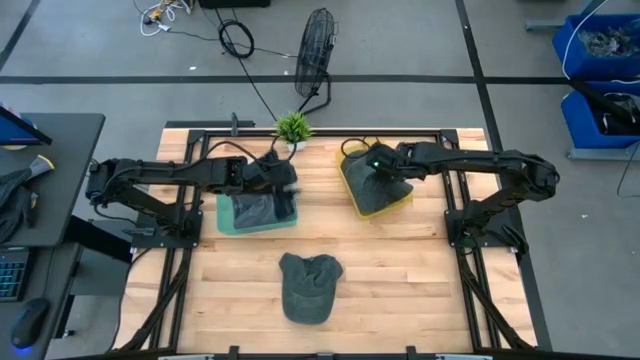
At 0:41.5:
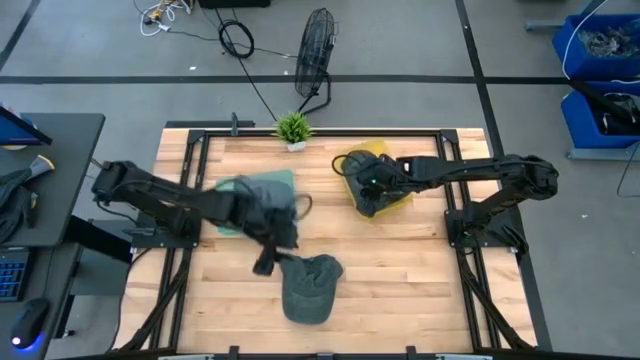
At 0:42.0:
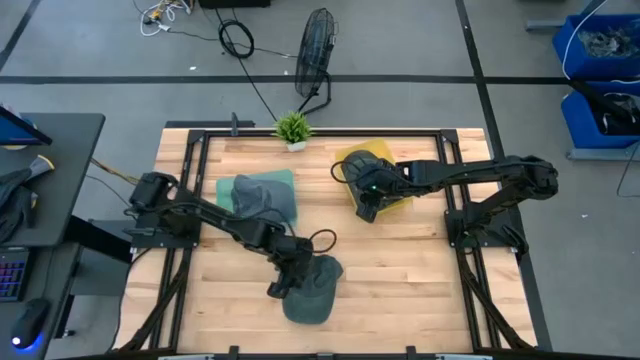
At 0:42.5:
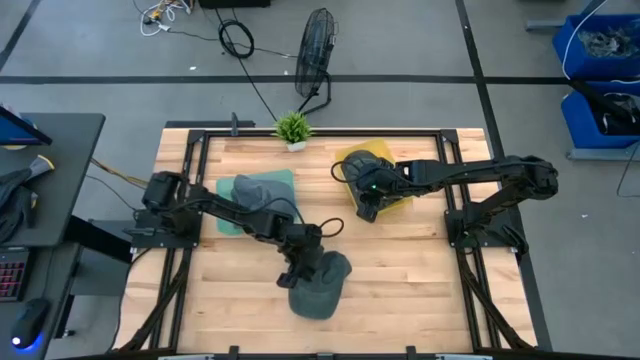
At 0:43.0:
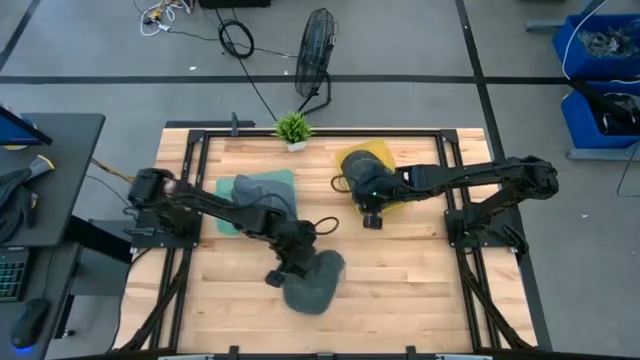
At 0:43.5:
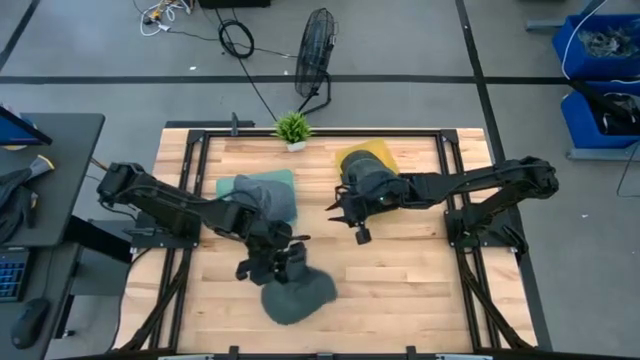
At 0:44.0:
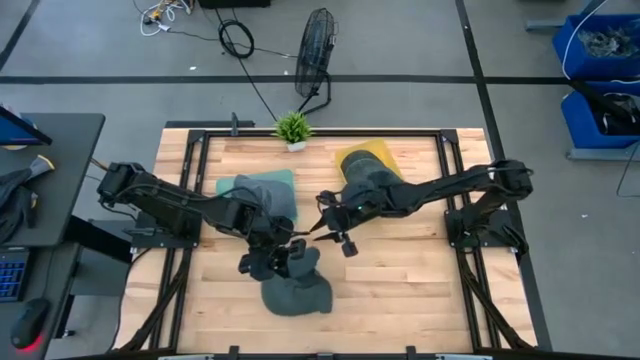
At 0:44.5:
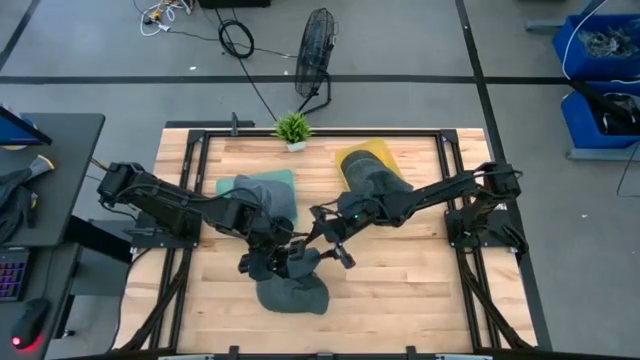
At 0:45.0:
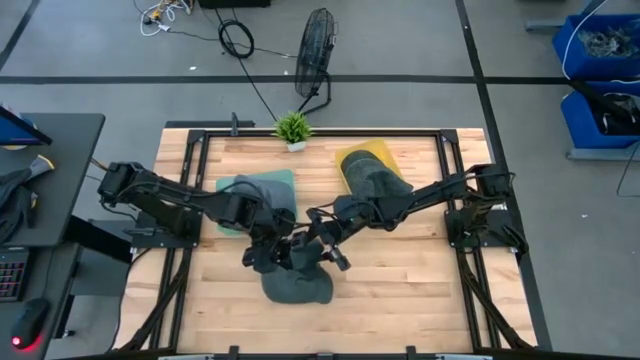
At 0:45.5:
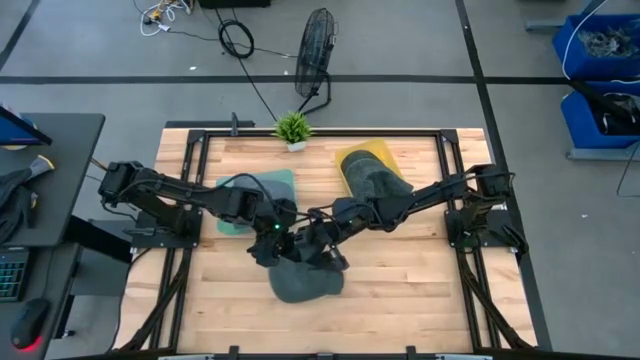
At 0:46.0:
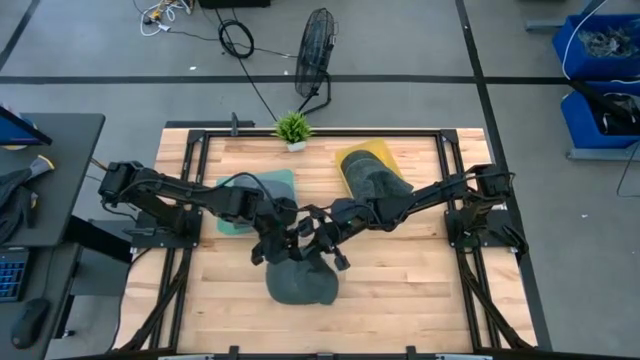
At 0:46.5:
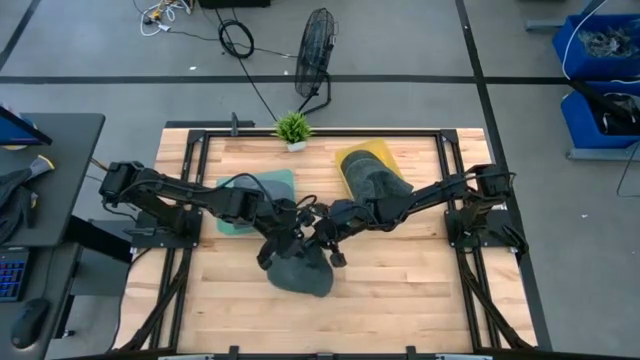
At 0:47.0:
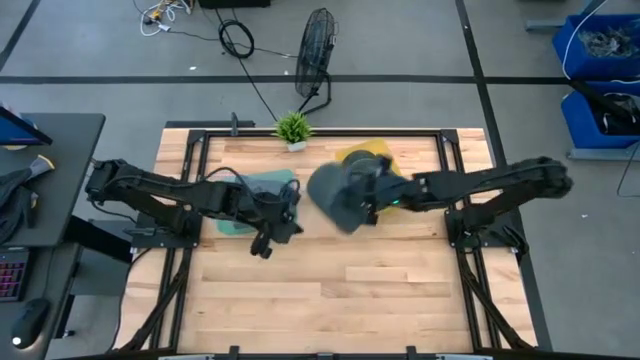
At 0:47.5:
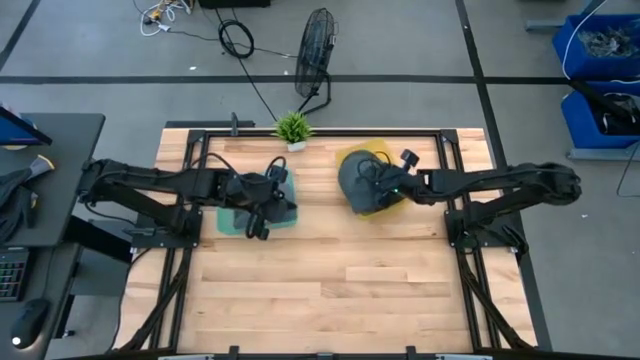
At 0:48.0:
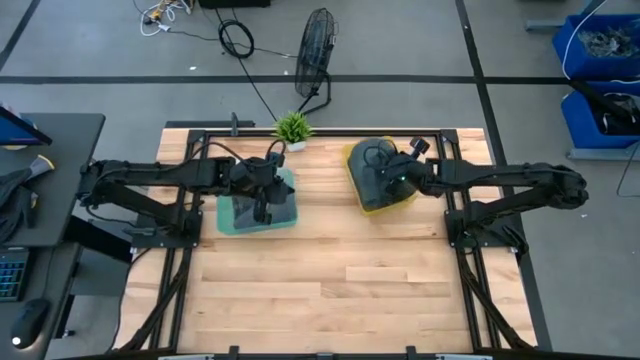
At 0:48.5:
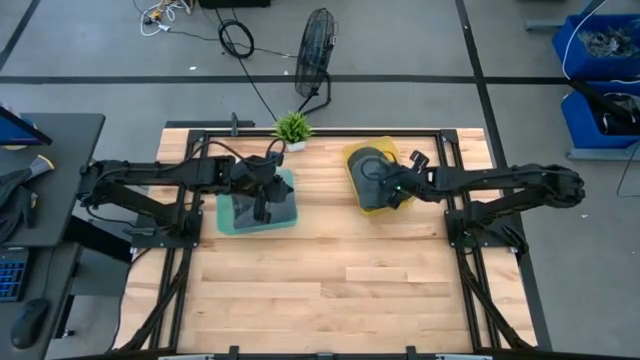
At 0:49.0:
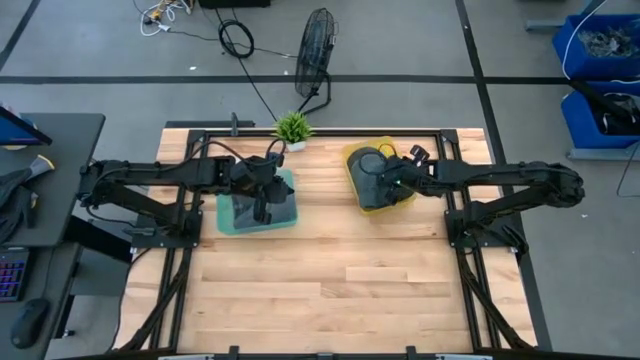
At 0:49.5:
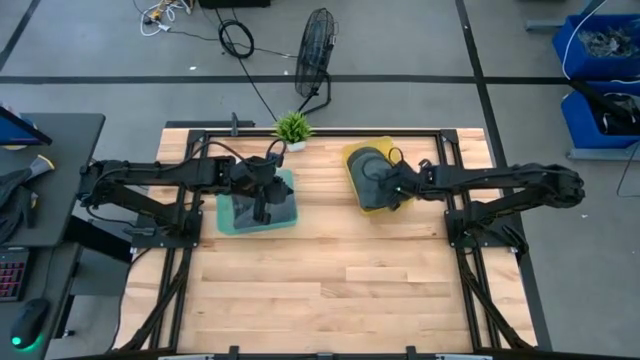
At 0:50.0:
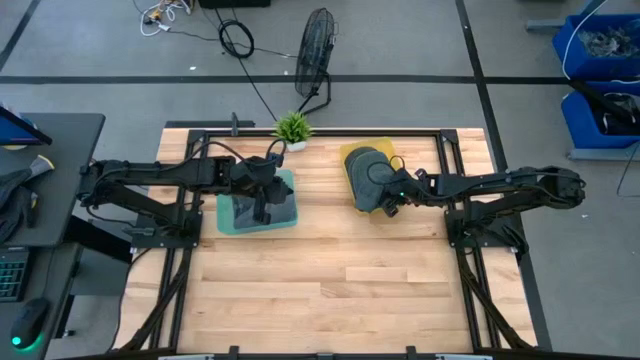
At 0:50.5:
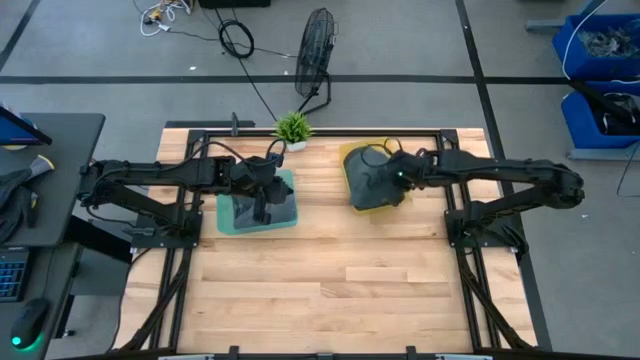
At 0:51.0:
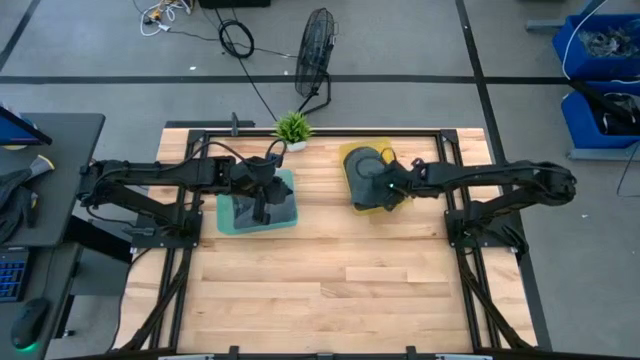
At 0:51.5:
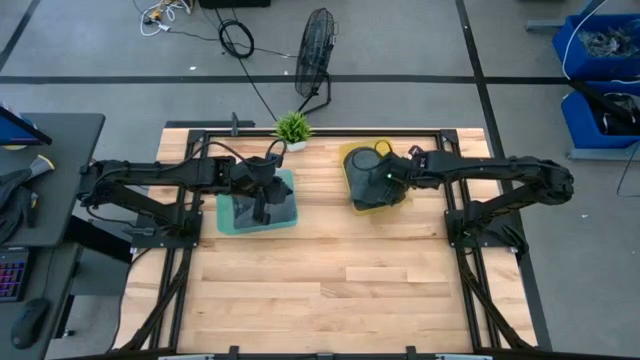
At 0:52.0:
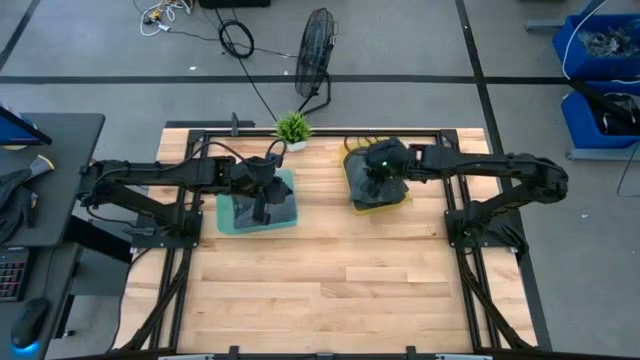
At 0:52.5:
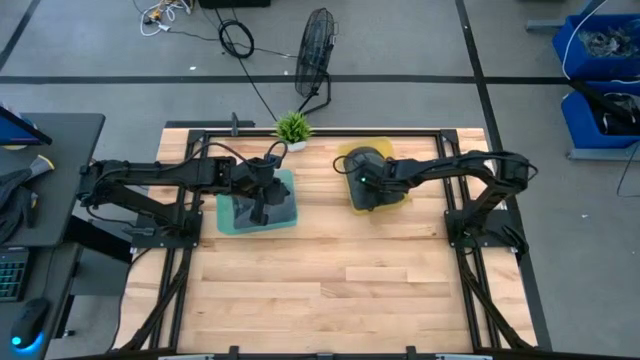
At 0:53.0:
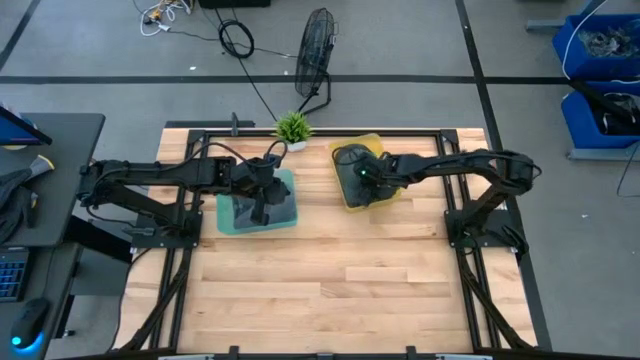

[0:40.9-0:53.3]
Task: Pick & Place hat
Put the black cap into the yellow bin

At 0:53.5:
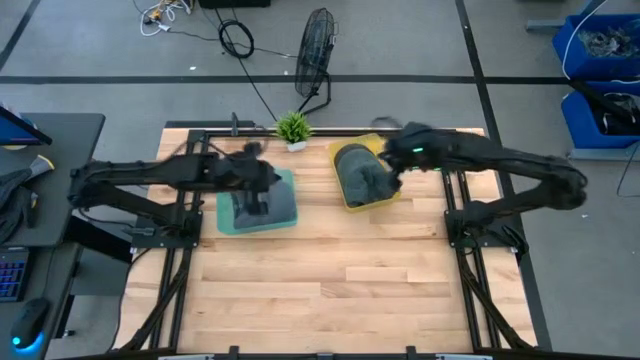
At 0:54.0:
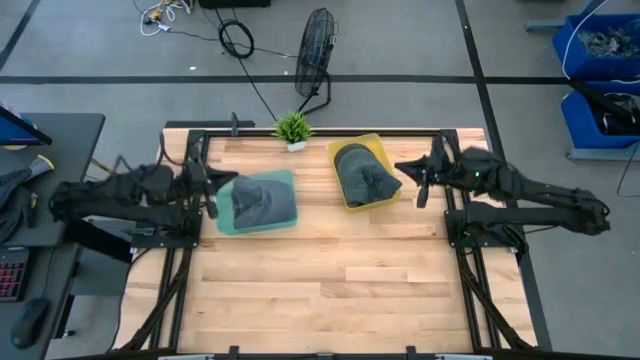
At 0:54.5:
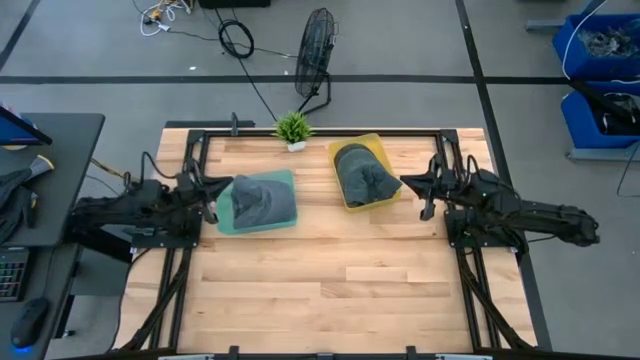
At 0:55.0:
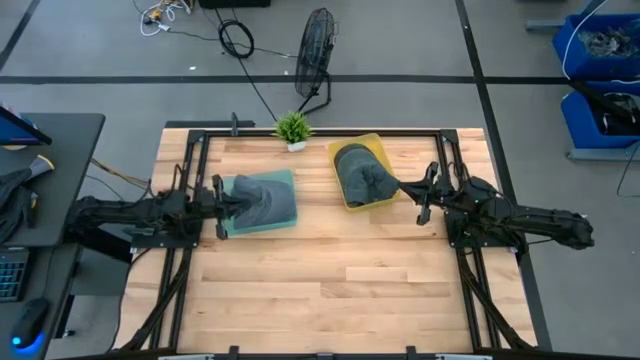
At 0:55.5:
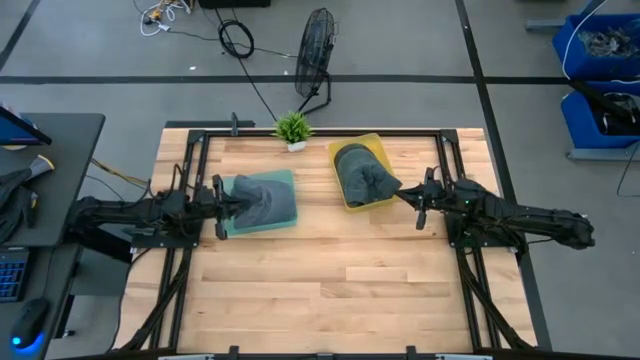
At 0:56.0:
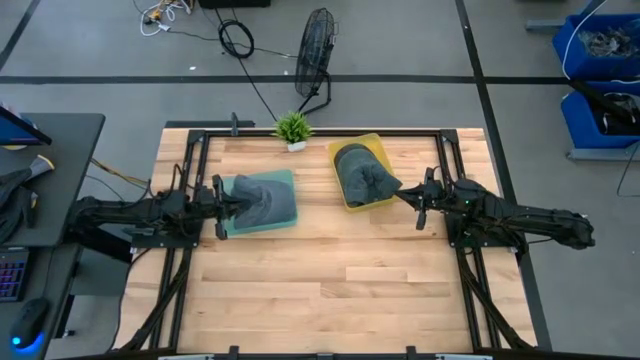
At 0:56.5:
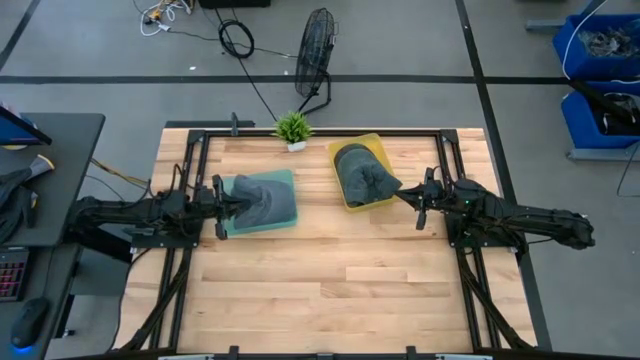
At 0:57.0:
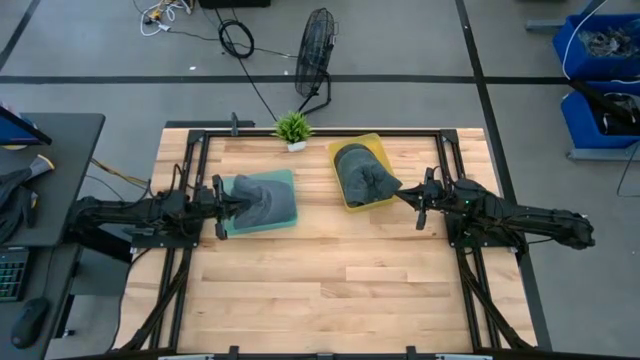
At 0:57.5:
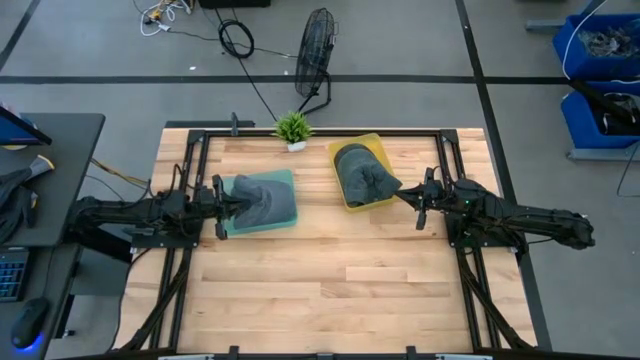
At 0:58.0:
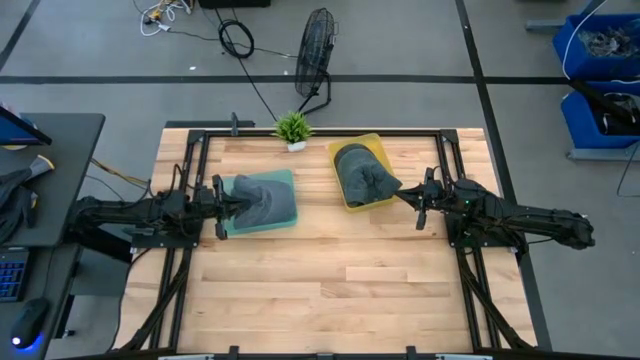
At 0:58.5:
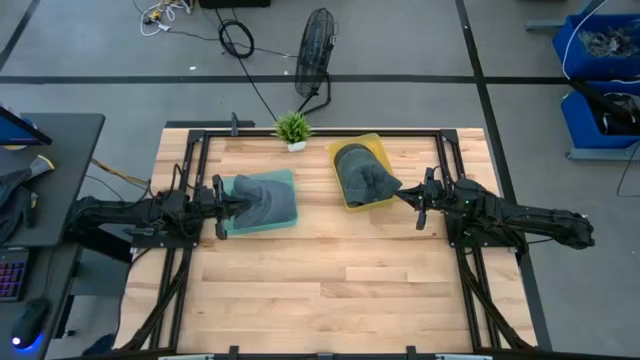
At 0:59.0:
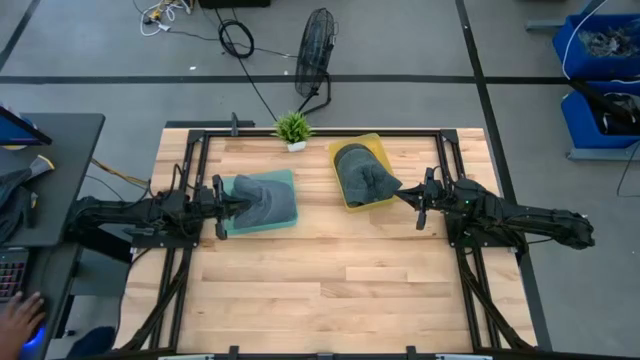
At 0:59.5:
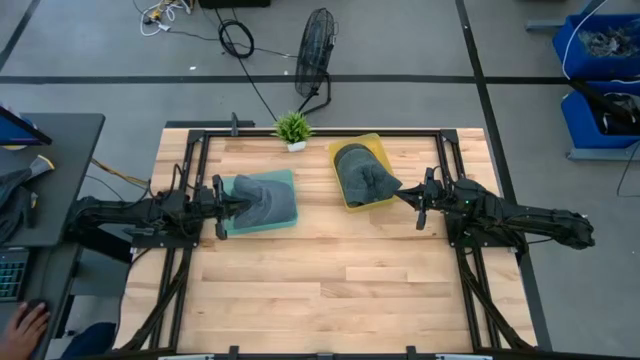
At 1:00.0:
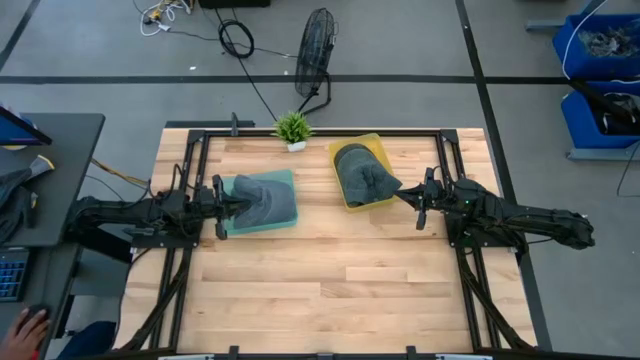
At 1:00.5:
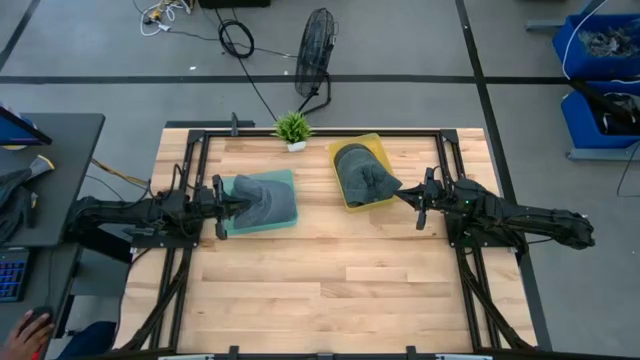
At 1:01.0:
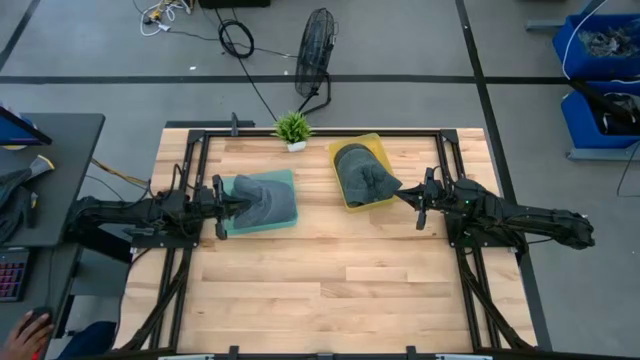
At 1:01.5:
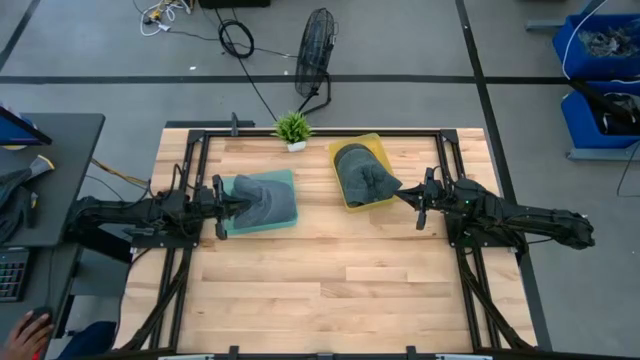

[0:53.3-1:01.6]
Return to Home Position

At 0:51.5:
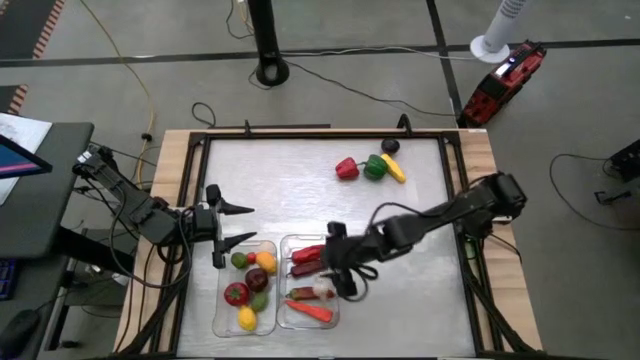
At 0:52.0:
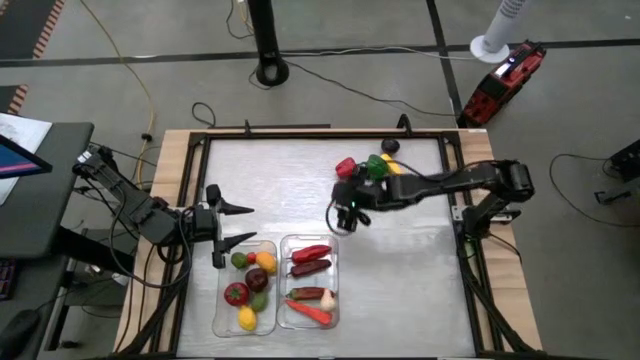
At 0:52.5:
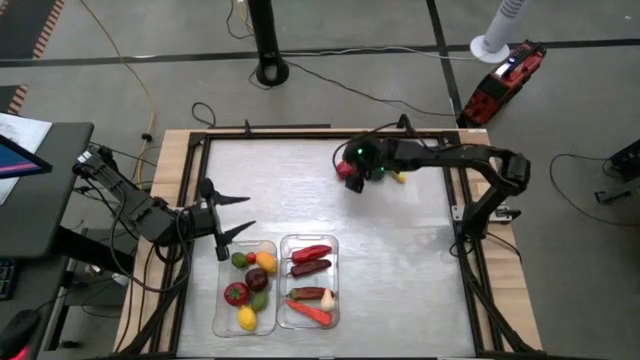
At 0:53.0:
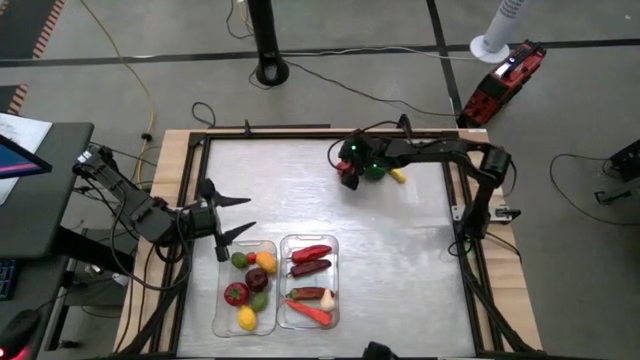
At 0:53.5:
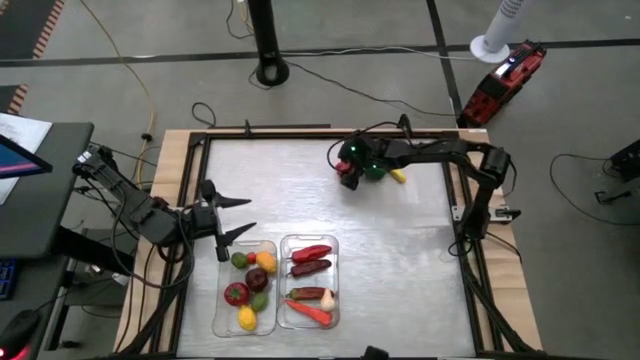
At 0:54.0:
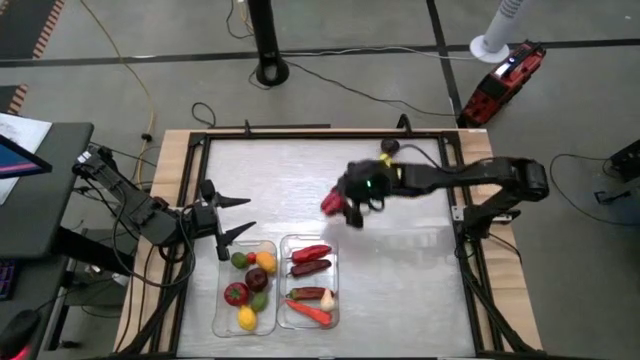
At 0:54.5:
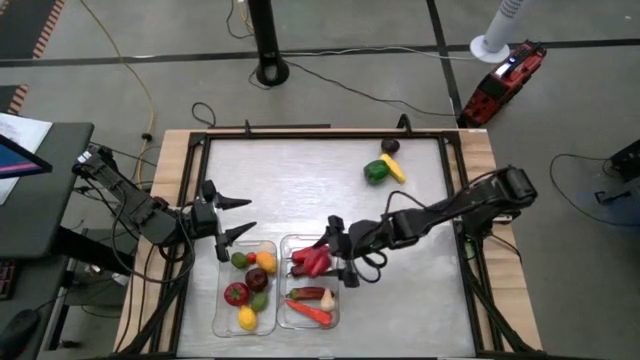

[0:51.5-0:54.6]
Task: Sort produce into baskets
Put the red bell pepper into the right transparent bin
